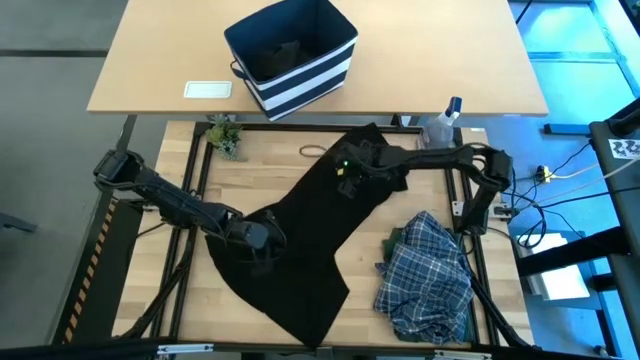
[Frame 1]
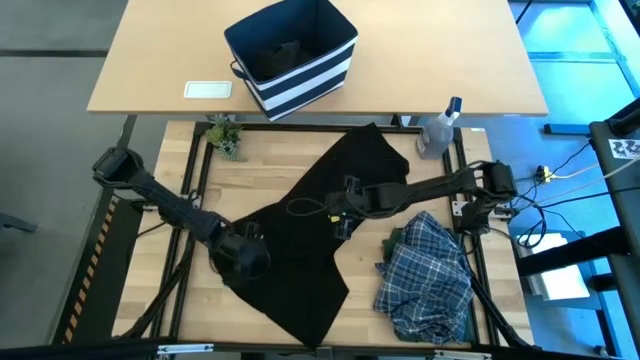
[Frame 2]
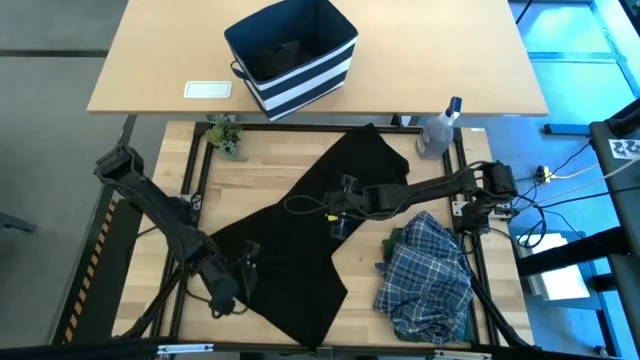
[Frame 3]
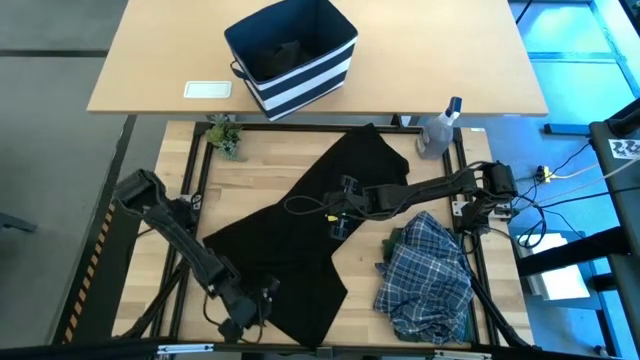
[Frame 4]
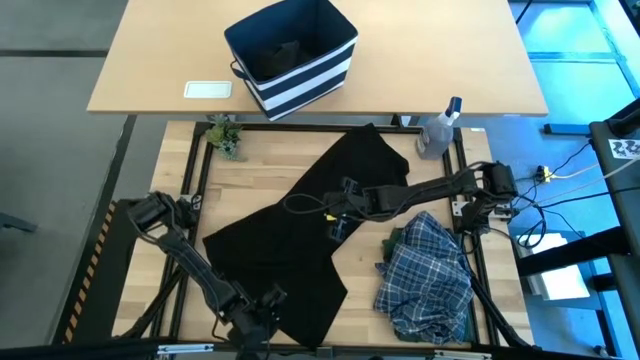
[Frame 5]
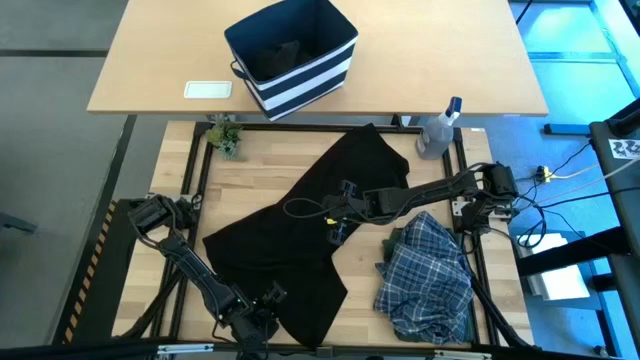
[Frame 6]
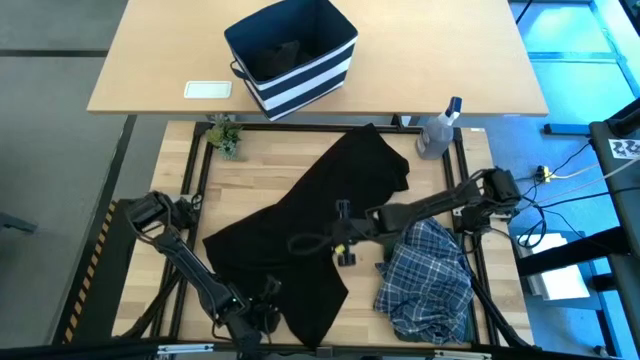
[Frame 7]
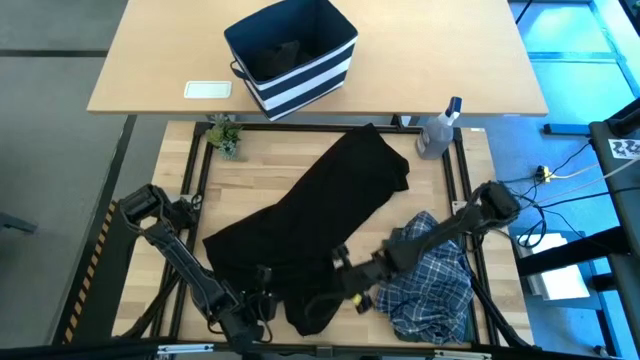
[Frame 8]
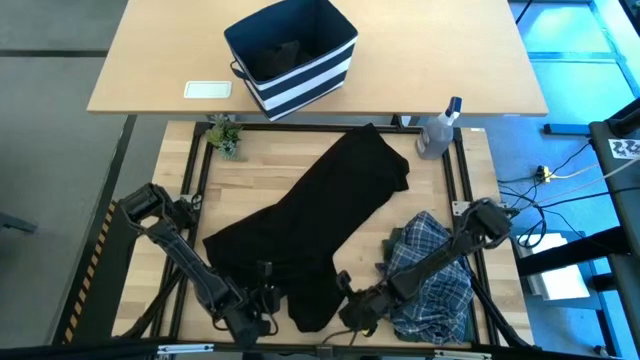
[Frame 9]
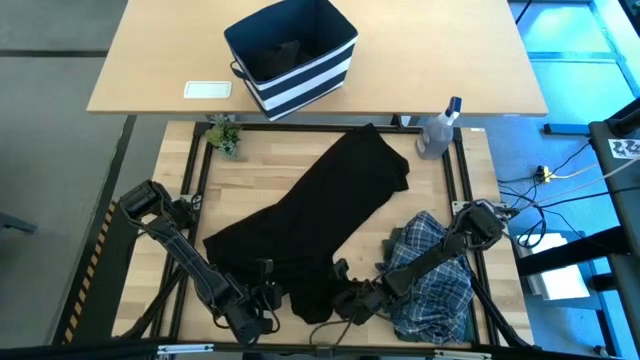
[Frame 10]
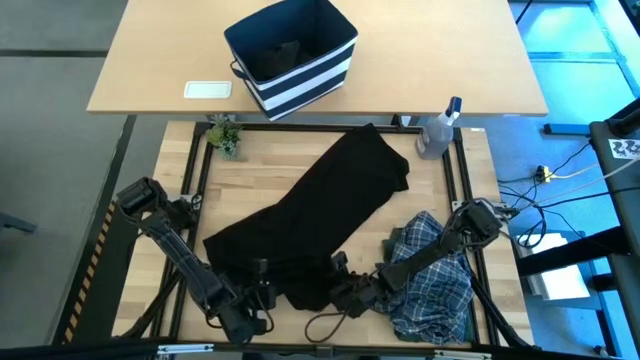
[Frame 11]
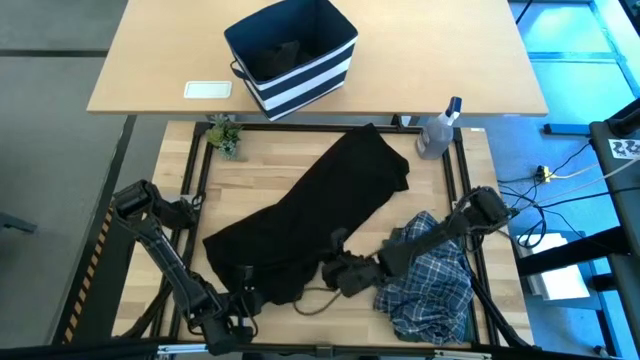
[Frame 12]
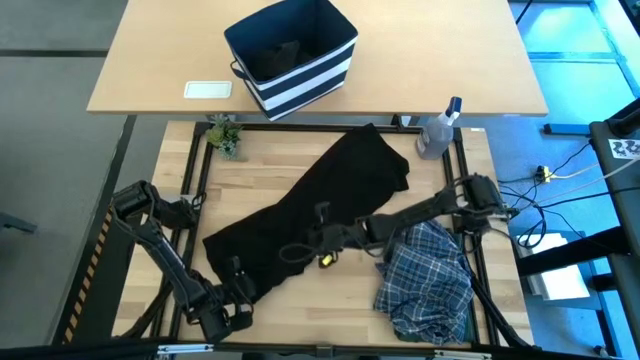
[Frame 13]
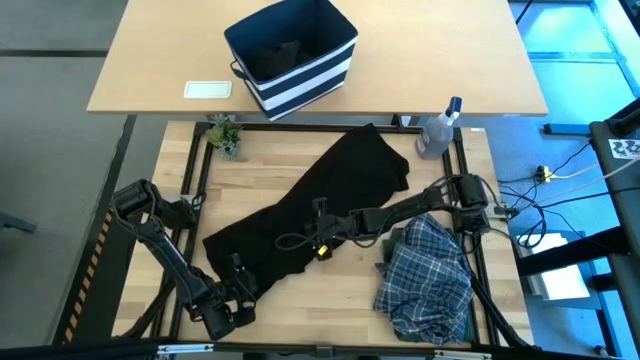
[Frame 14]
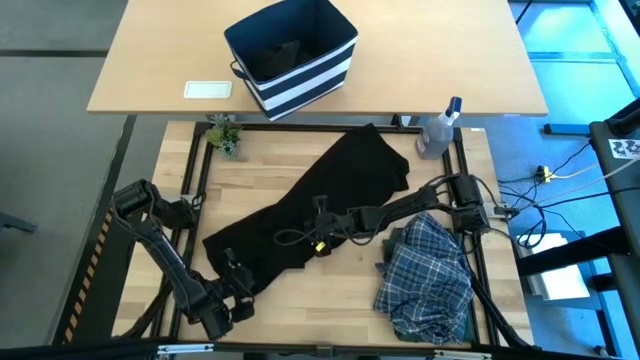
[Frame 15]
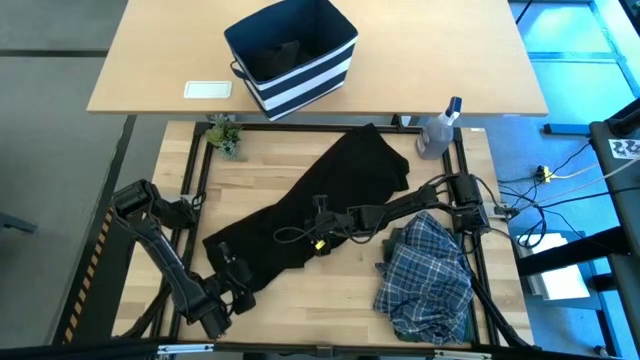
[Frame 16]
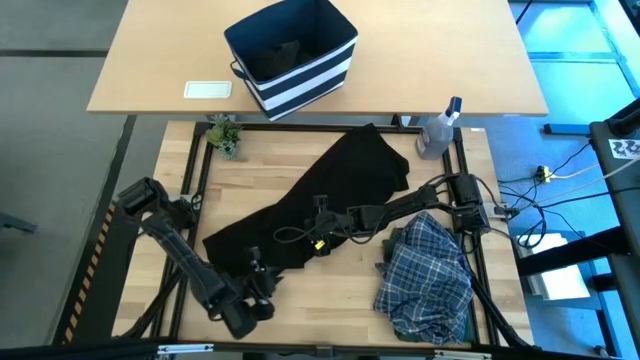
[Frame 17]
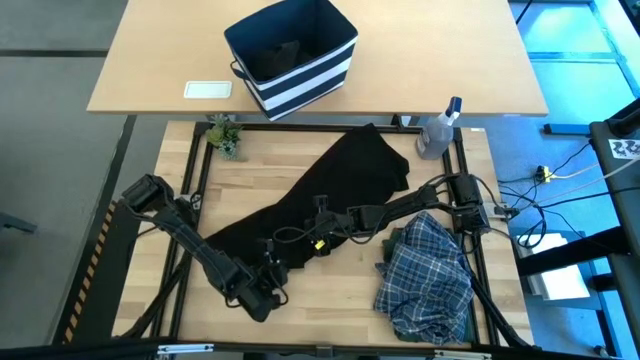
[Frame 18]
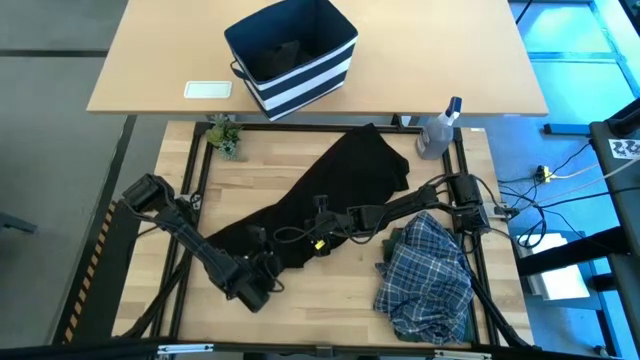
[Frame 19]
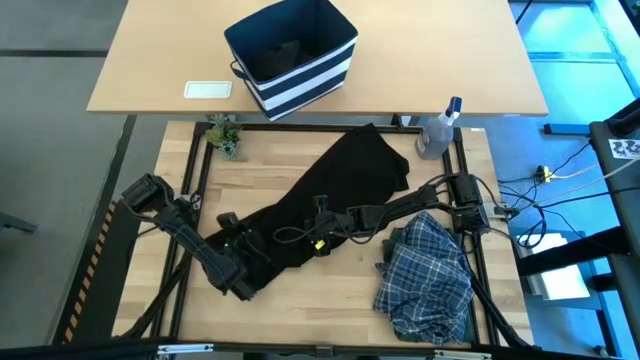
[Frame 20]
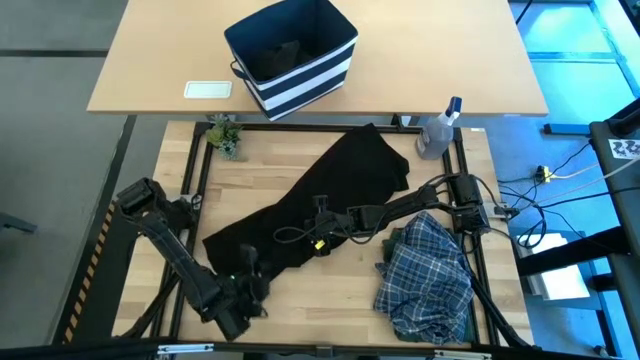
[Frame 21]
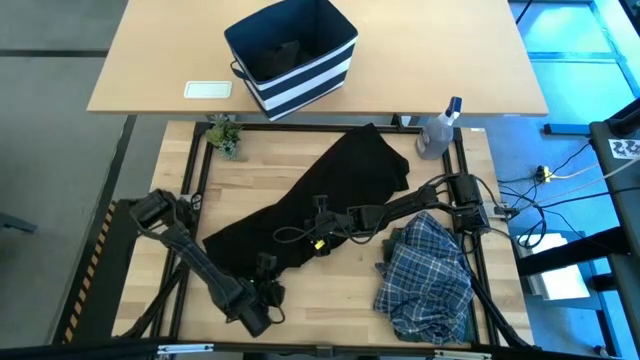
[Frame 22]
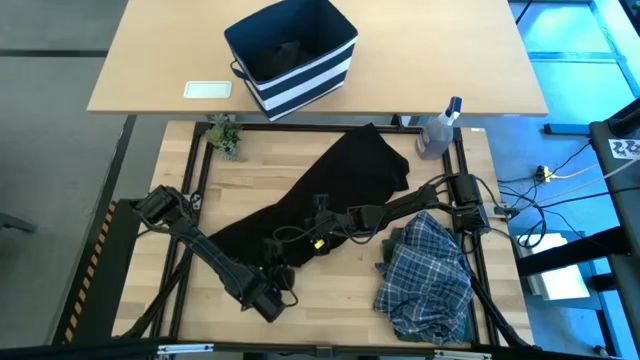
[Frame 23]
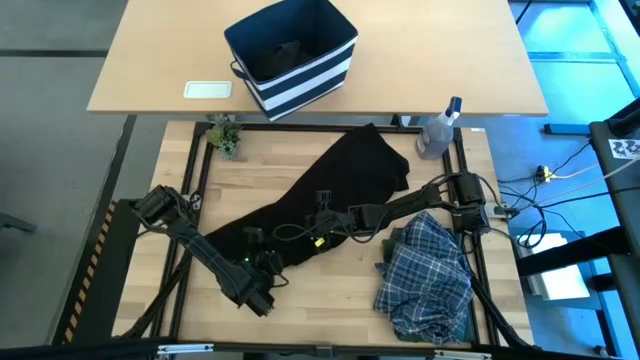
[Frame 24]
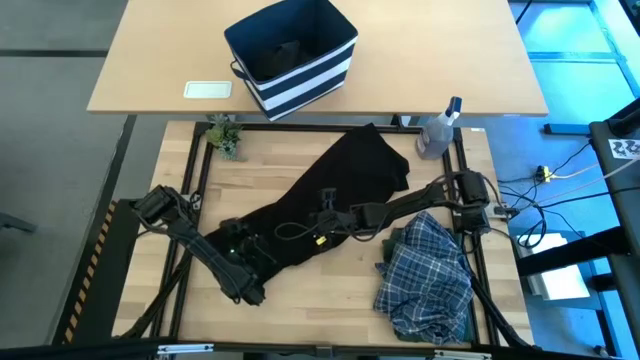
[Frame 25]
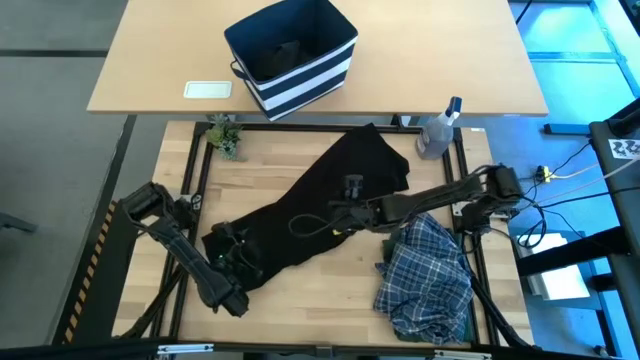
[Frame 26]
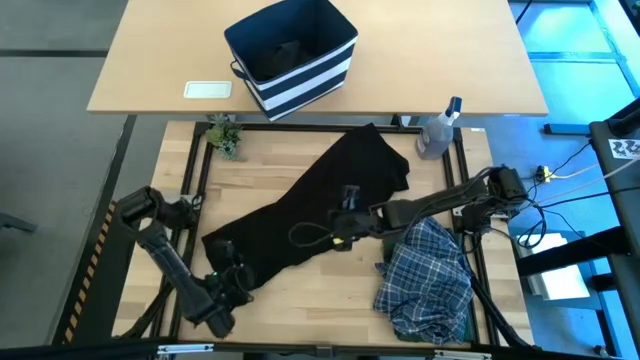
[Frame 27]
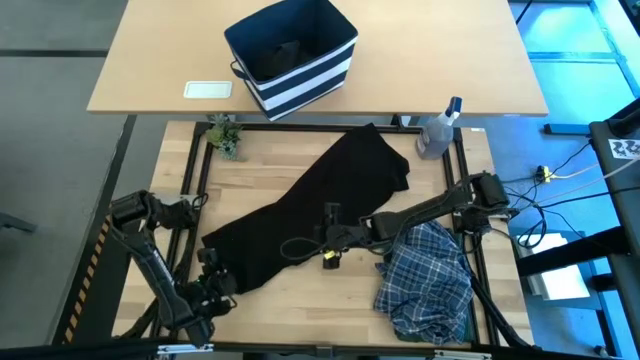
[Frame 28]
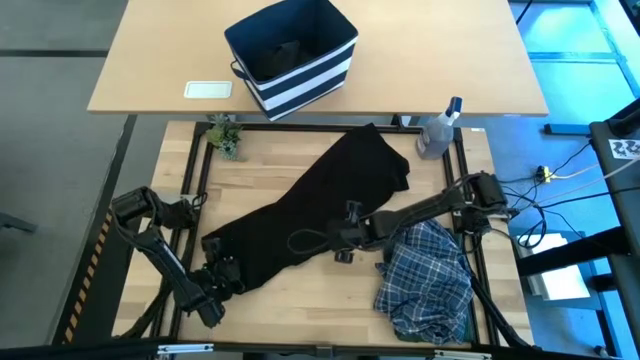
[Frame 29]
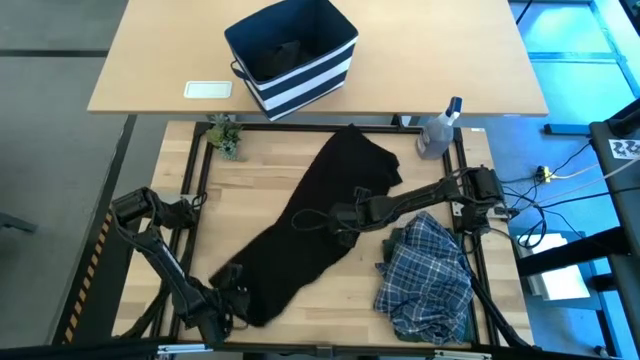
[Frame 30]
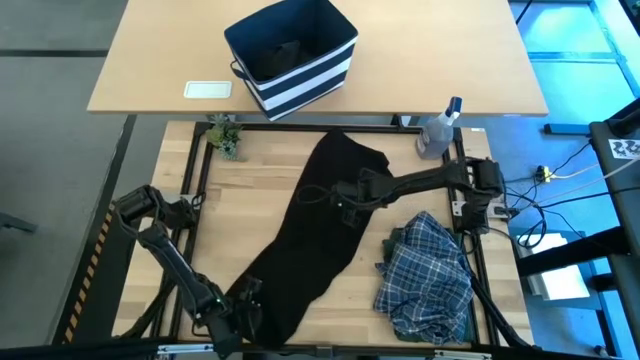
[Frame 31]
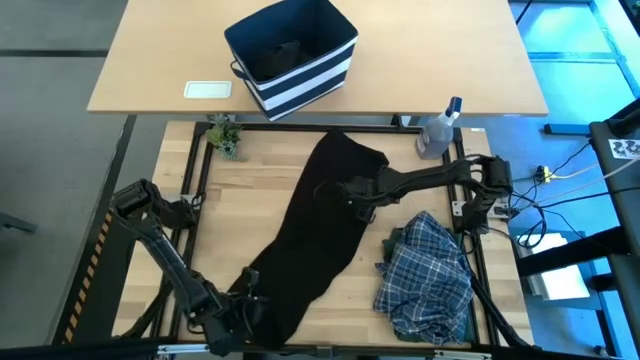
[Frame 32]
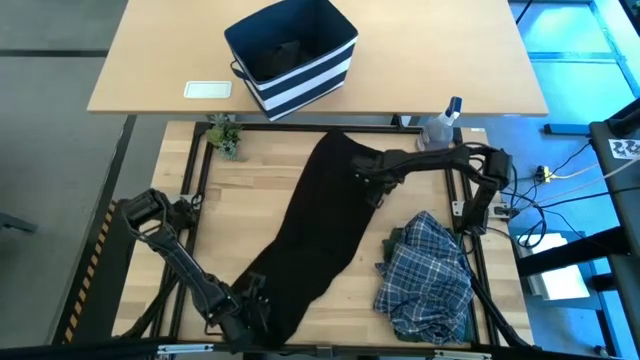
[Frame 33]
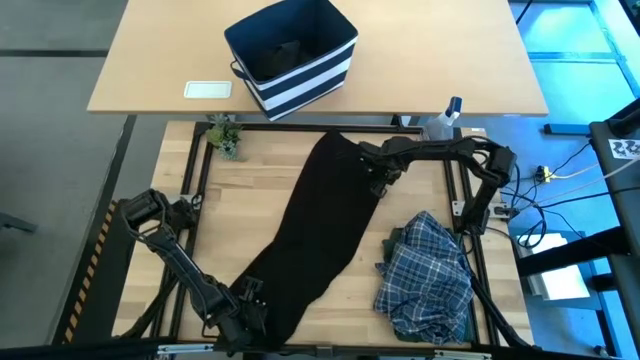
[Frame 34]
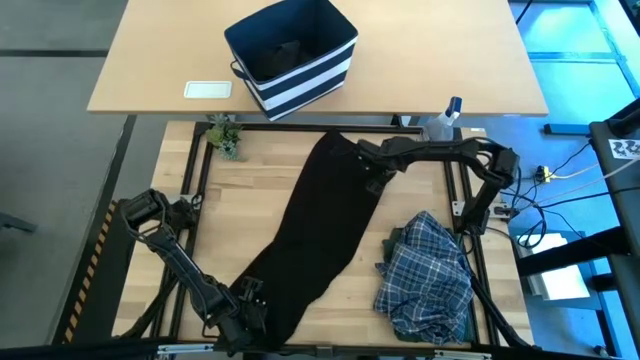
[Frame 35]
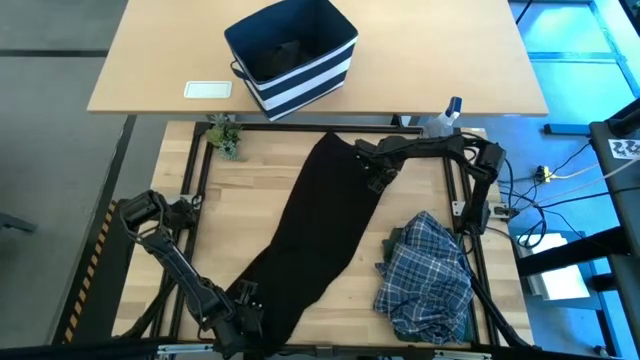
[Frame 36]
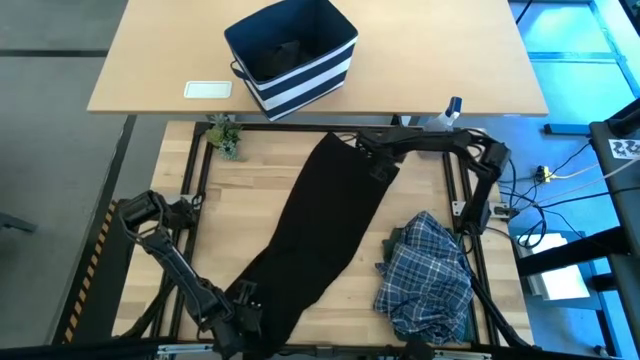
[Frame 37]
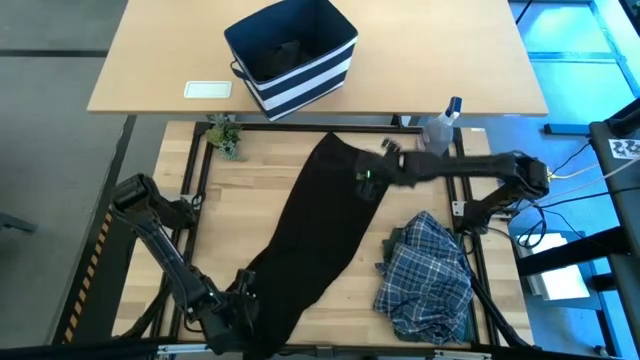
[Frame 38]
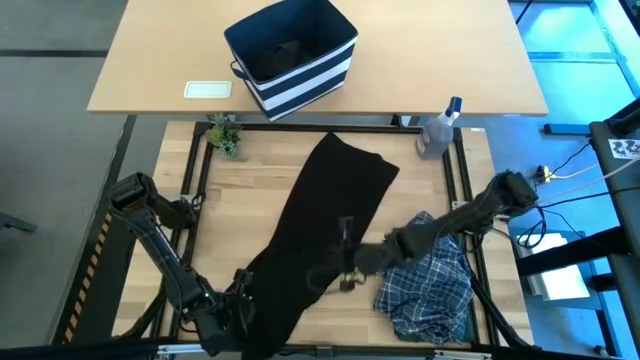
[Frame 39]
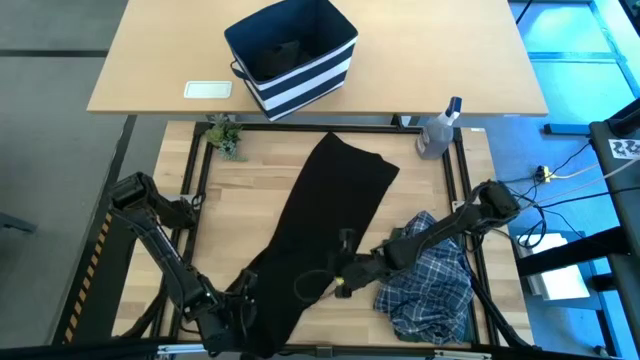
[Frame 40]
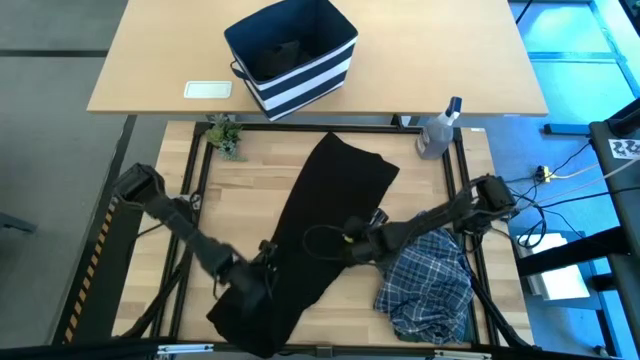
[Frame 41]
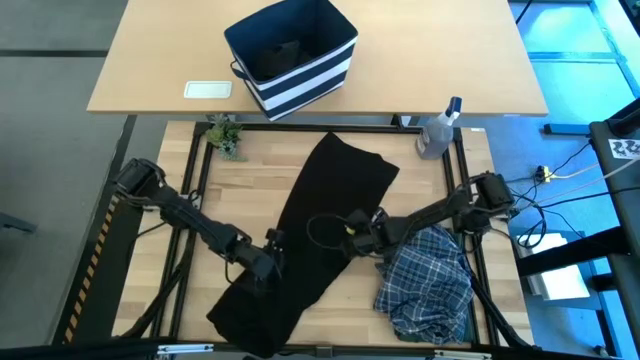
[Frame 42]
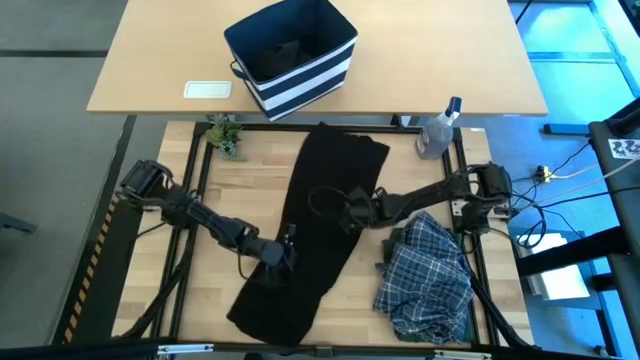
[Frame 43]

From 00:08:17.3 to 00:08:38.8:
Task: Fold Laundry from Bin
Fold the black shirt
